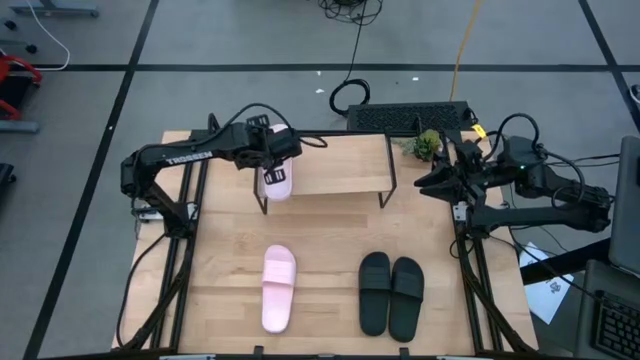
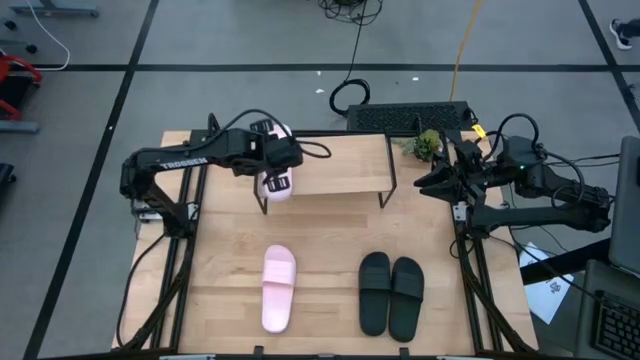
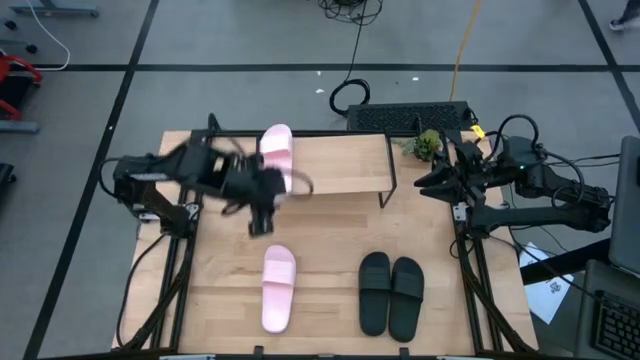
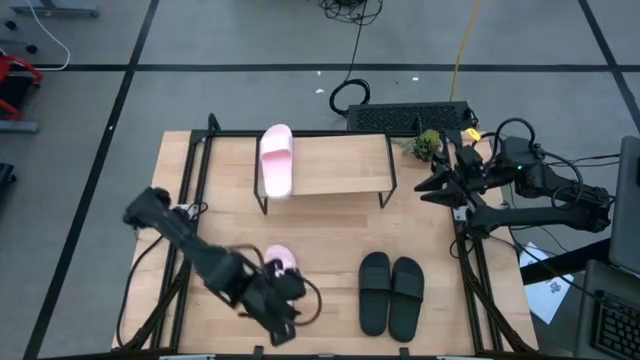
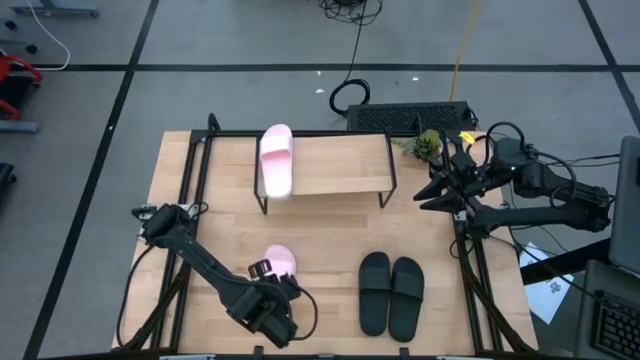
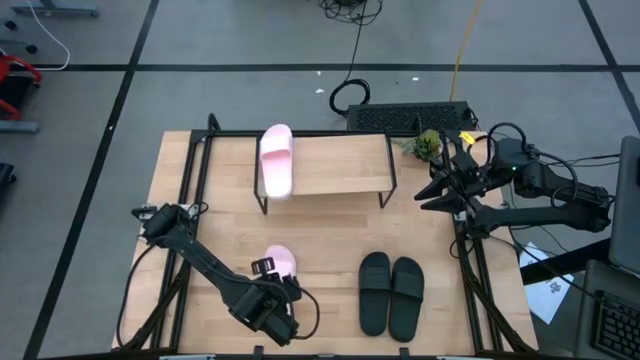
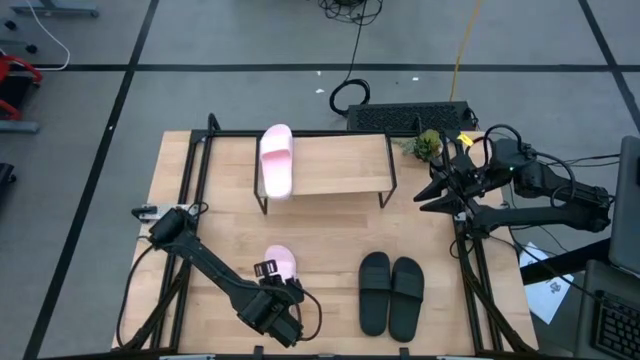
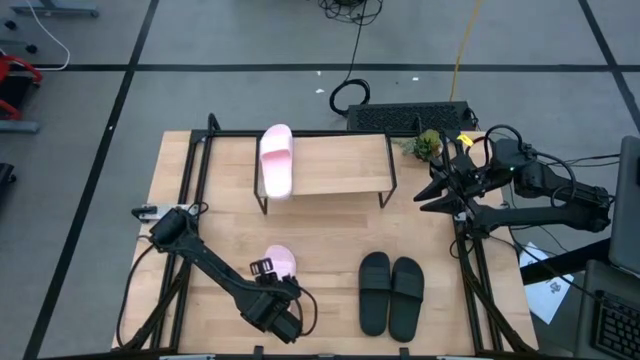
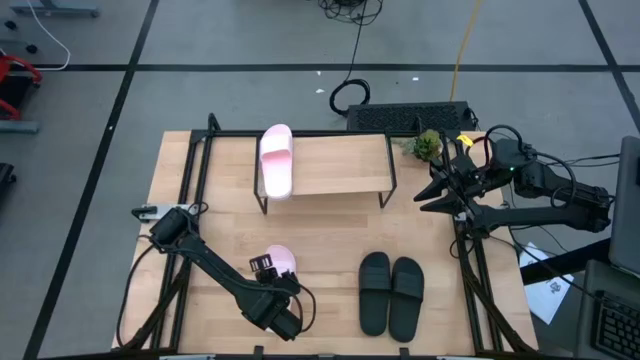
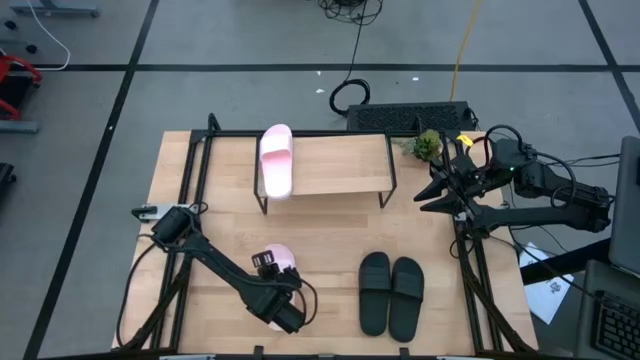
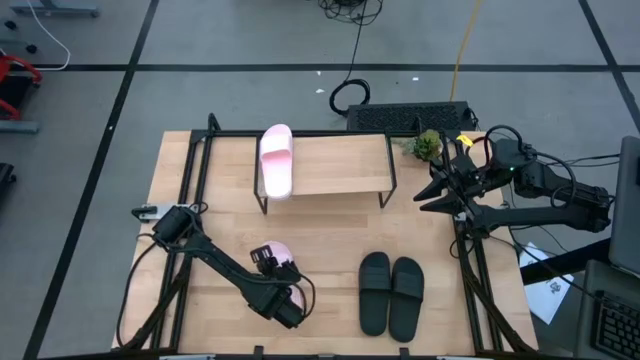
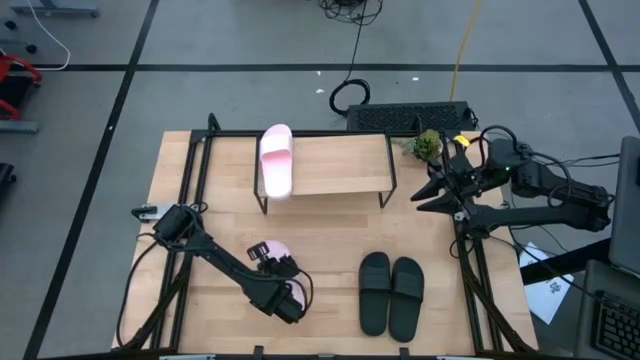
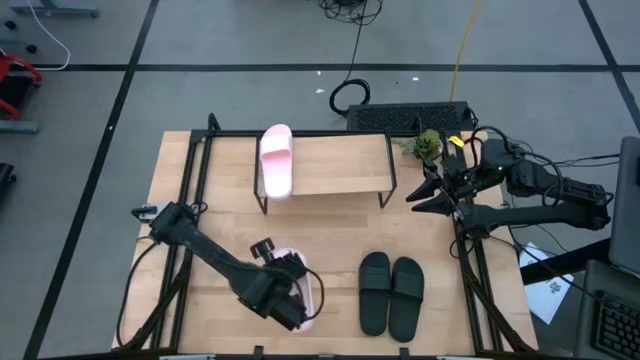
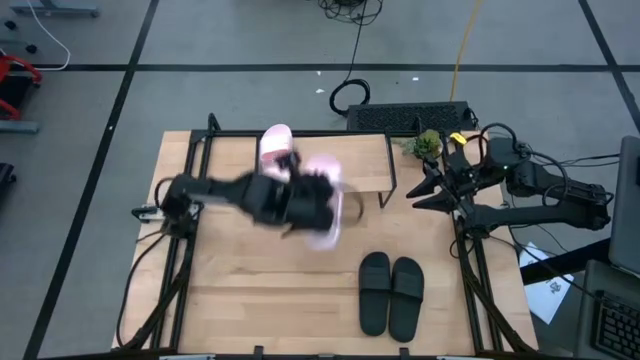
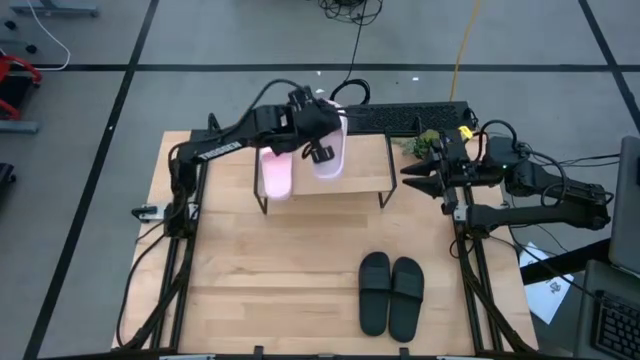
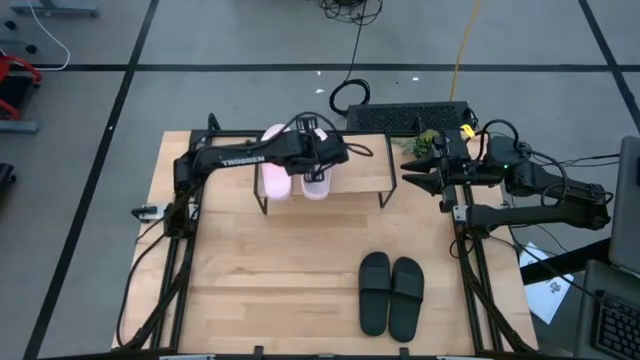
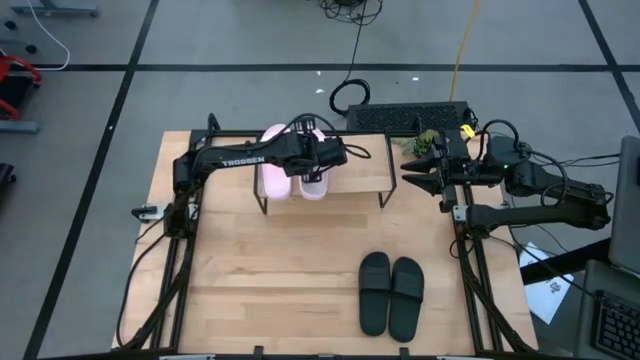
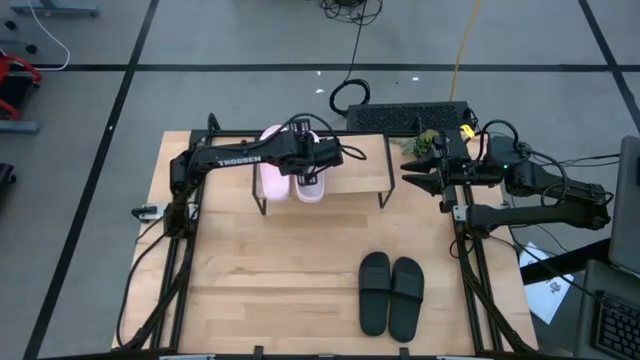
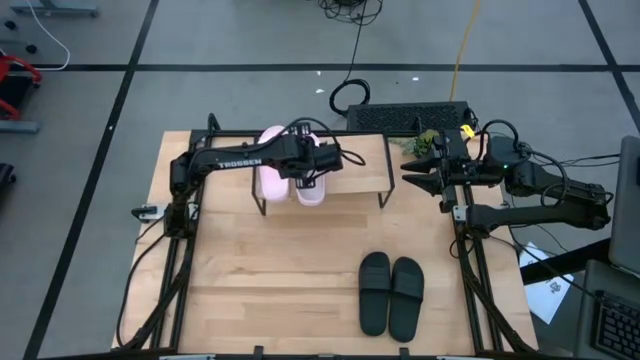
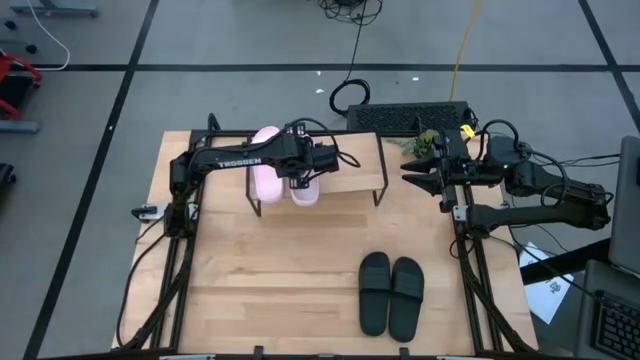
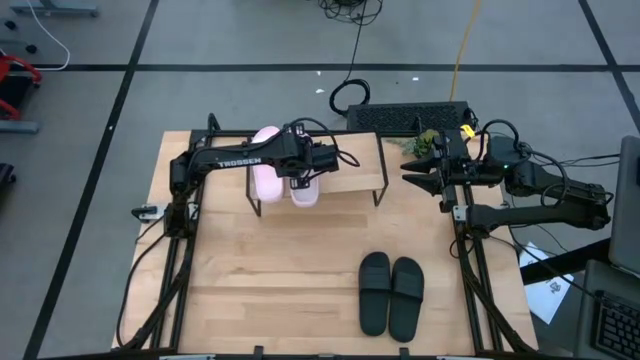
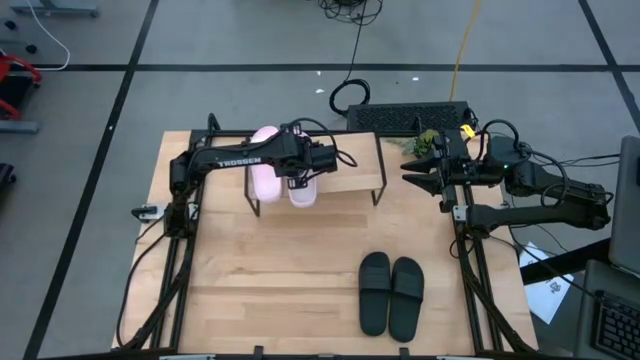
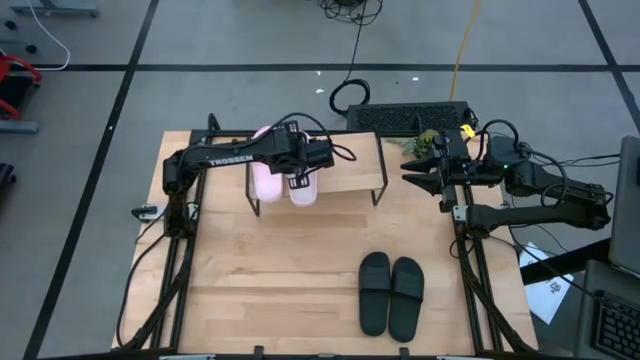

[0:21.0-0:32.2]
Task: Pick and place slides into the shelf
Put the pink slide on the shelf

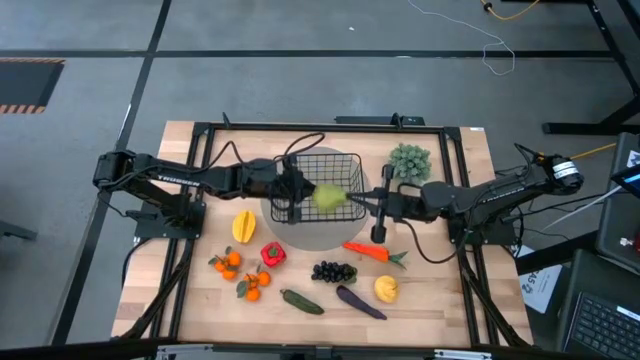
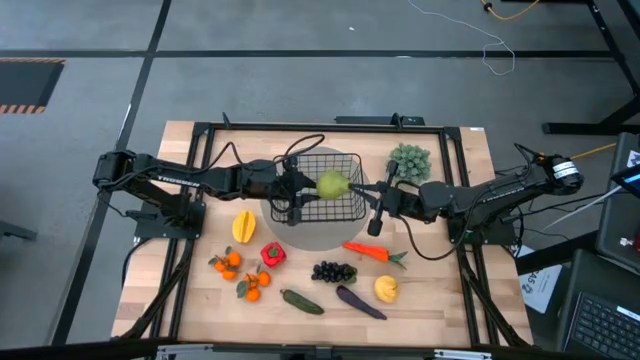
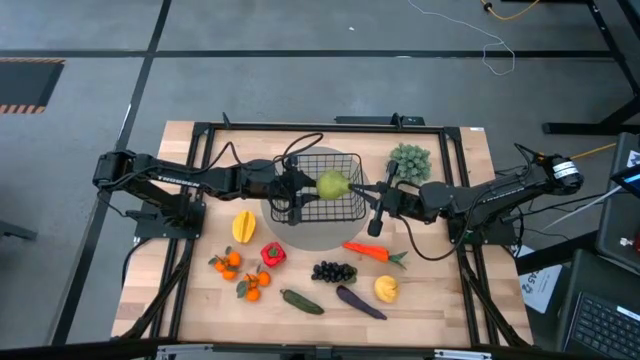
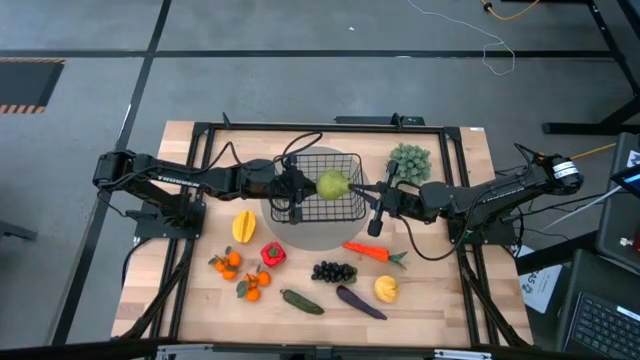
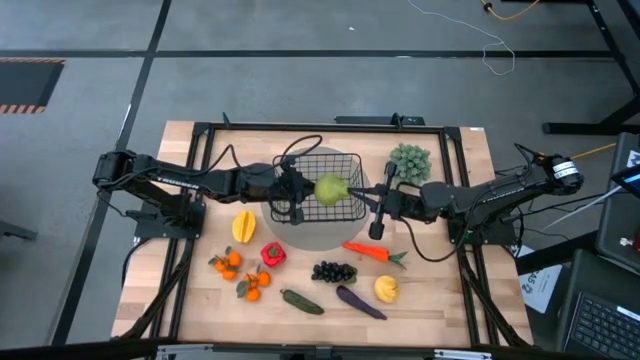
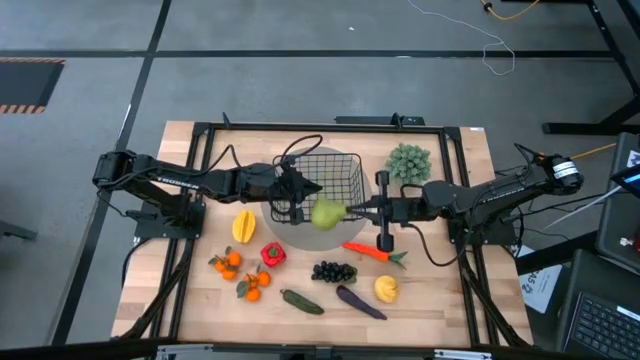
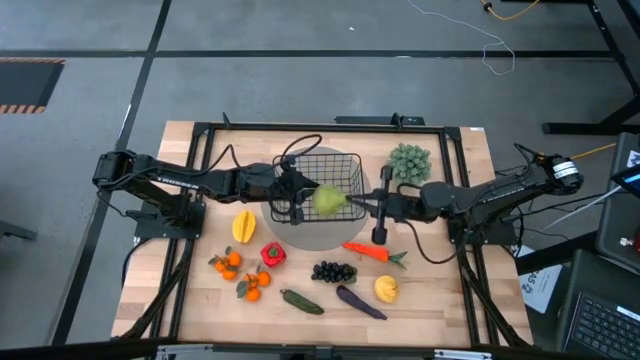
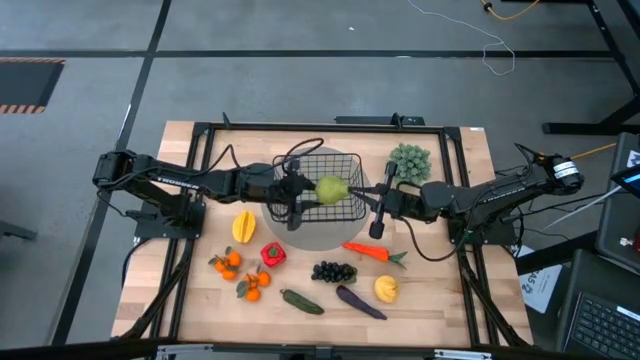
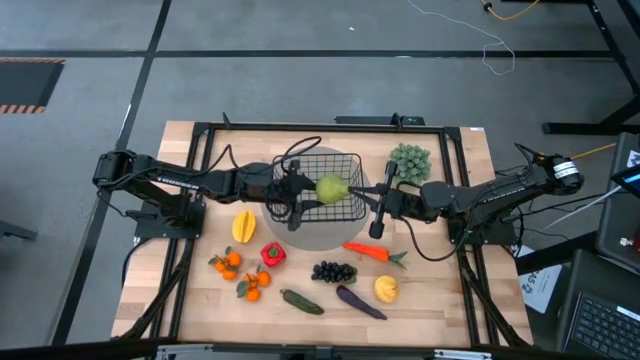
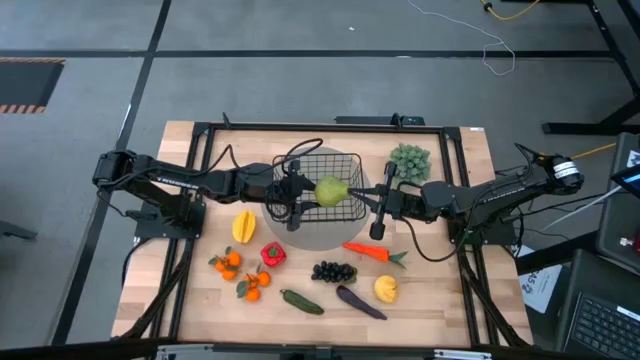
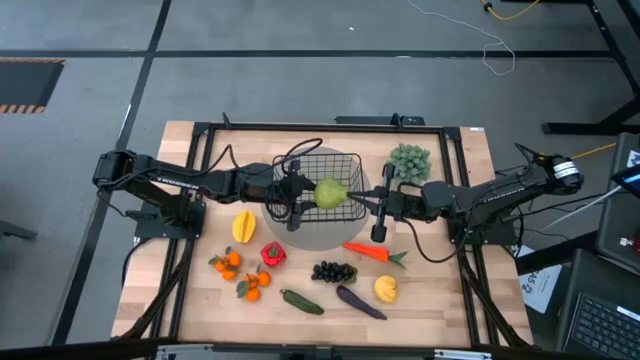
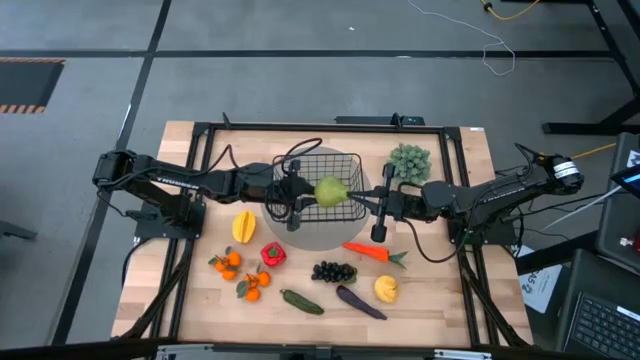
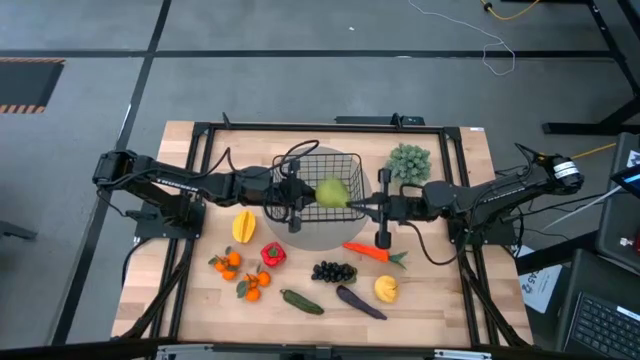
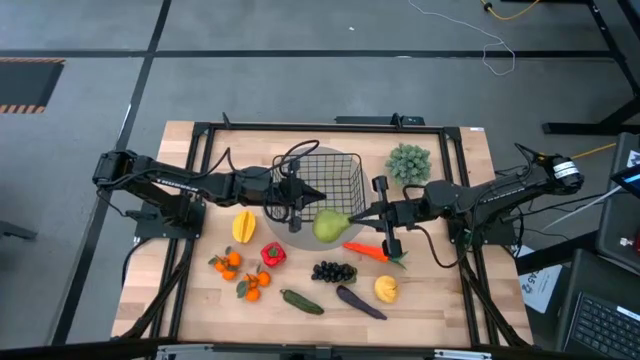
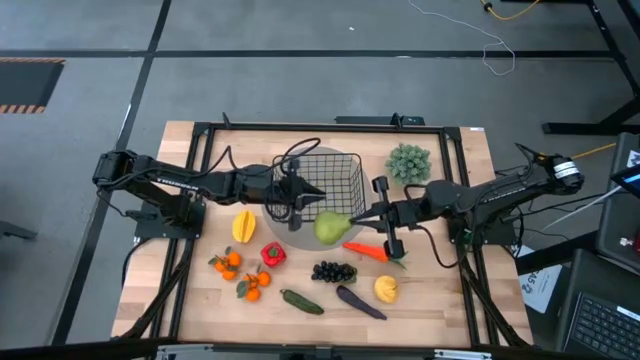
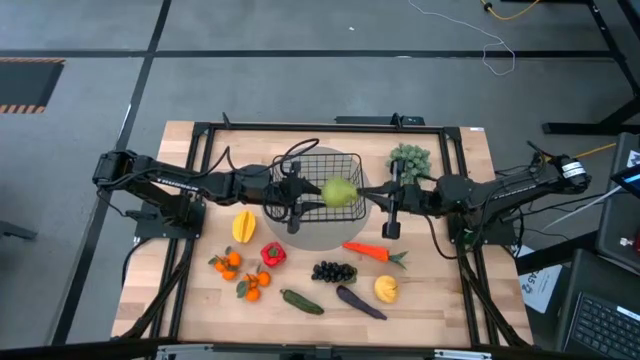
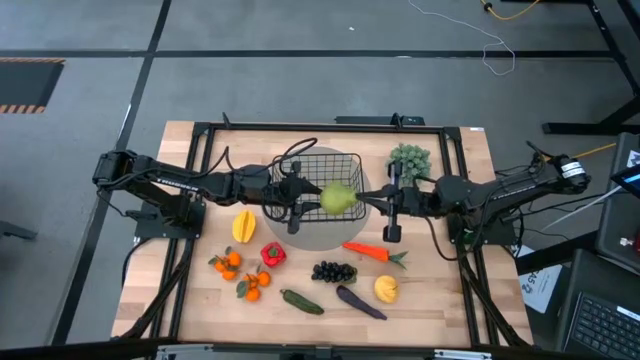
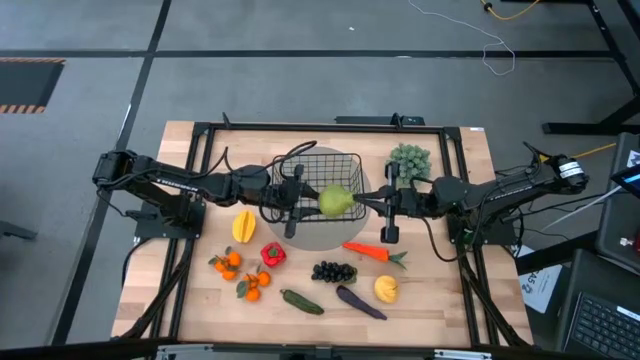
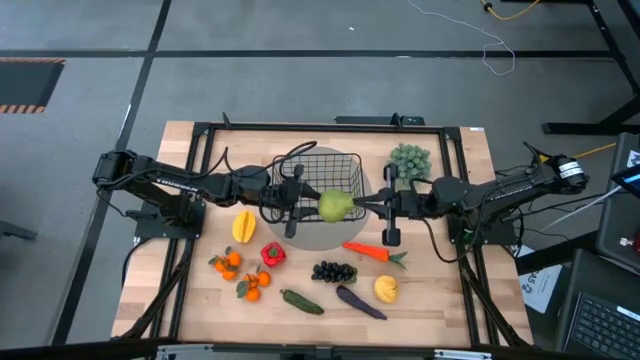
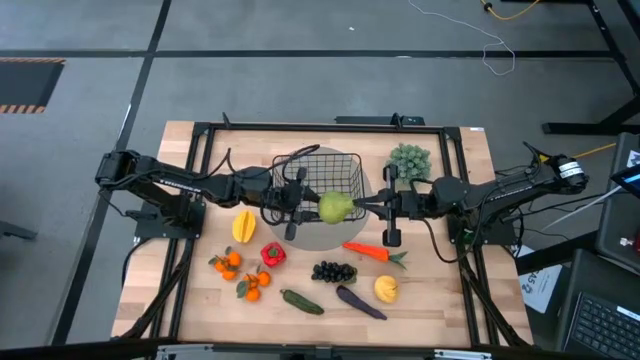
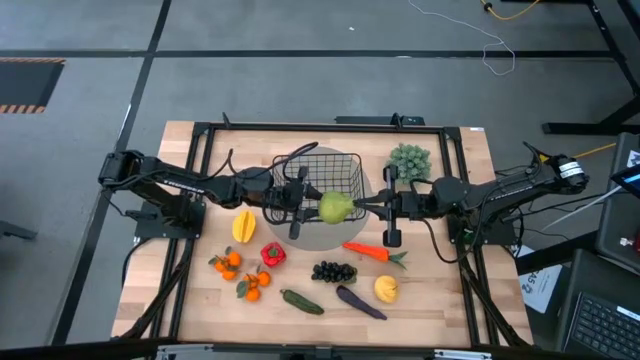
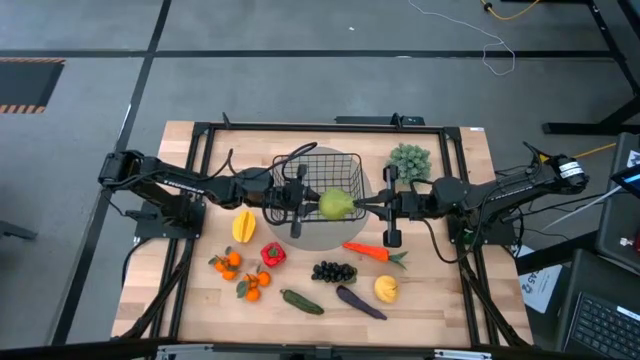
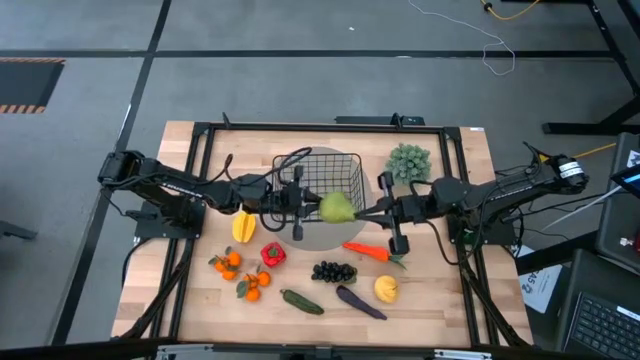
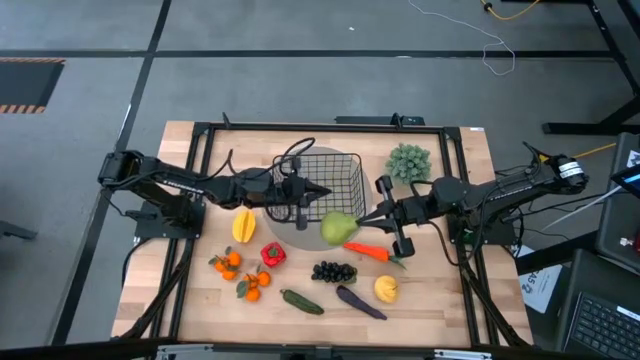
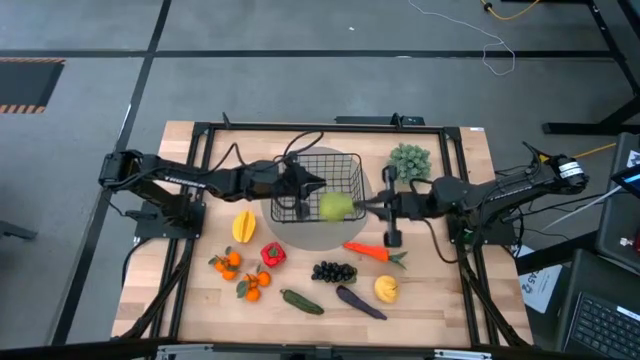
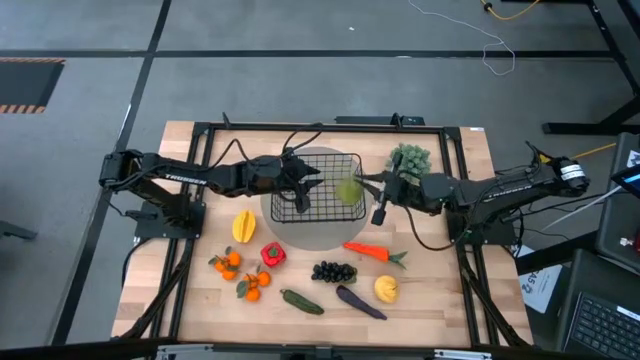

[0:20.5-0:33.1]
Task: Build produce basket
Put the green pear into the black wire basket
